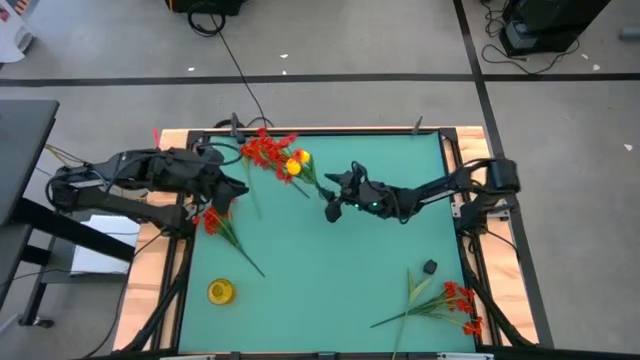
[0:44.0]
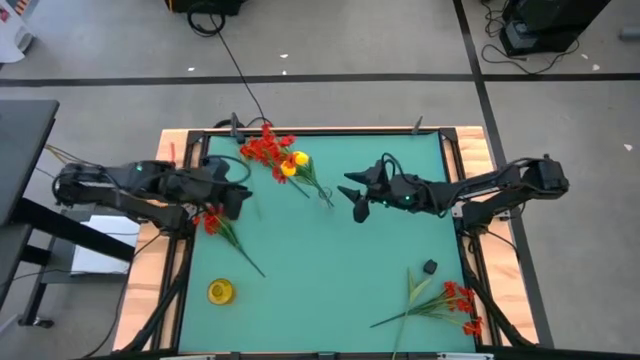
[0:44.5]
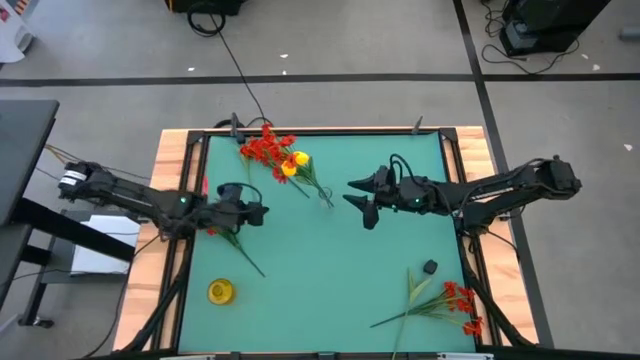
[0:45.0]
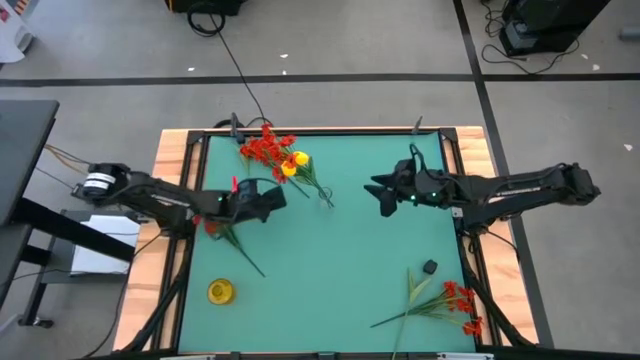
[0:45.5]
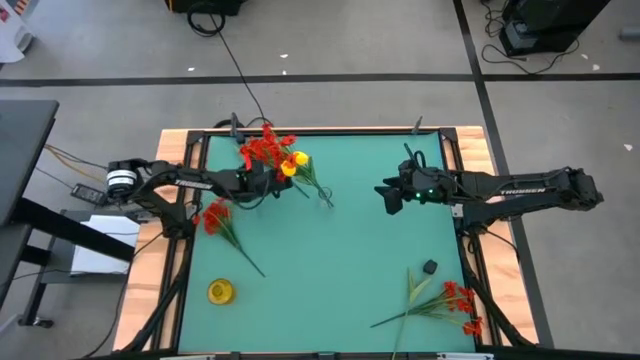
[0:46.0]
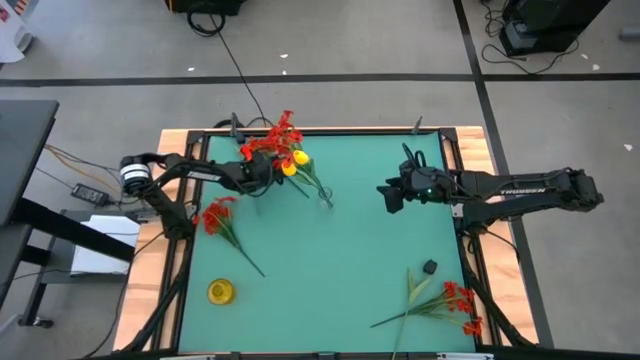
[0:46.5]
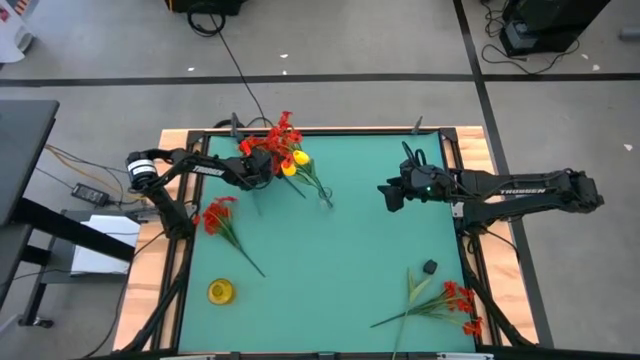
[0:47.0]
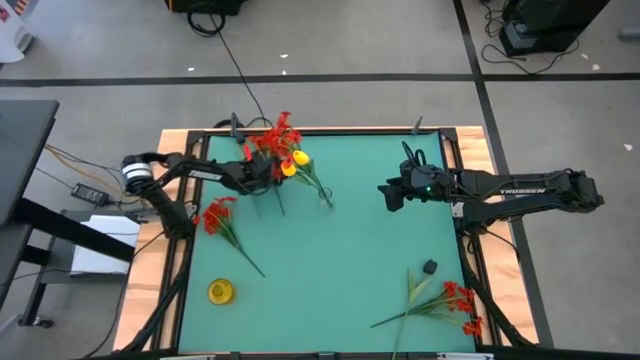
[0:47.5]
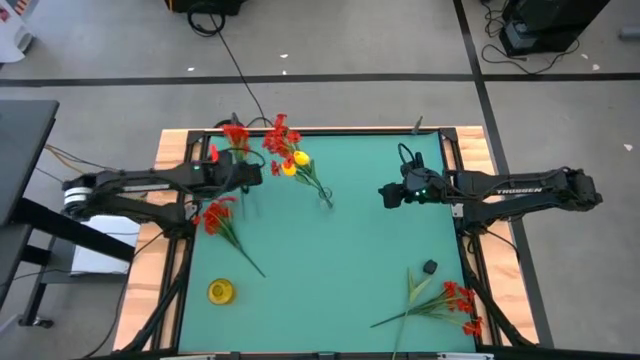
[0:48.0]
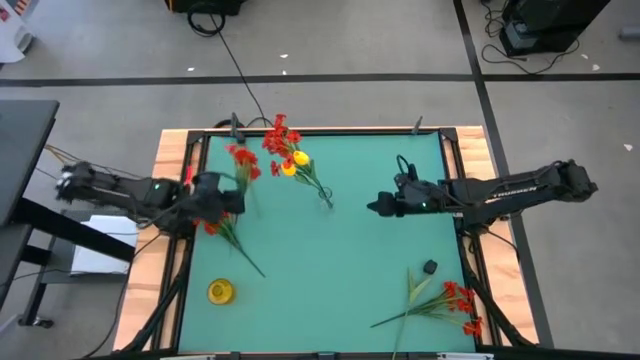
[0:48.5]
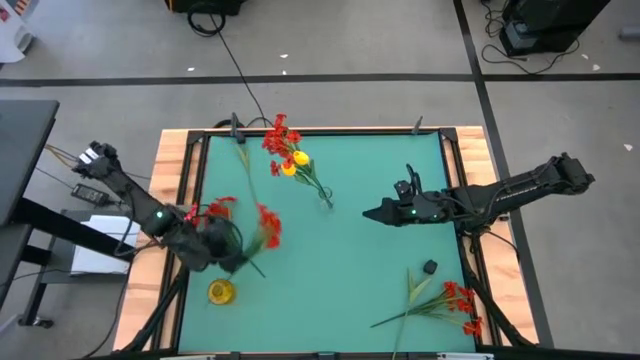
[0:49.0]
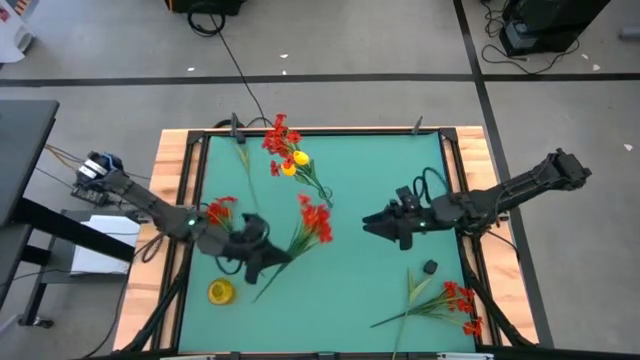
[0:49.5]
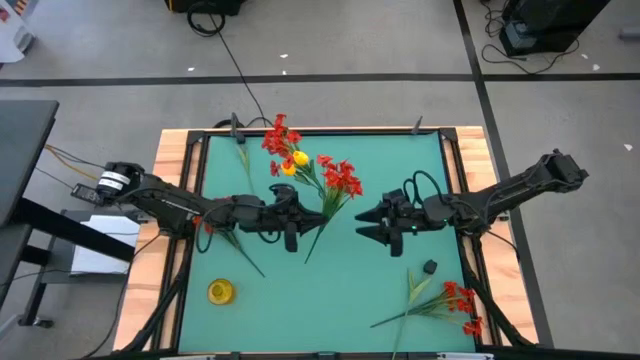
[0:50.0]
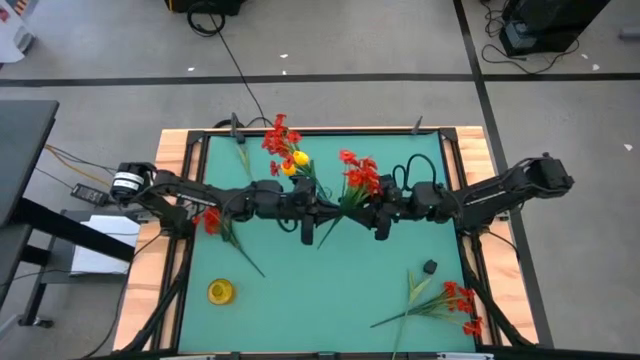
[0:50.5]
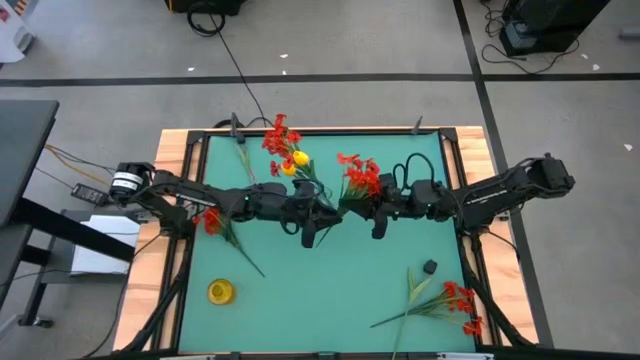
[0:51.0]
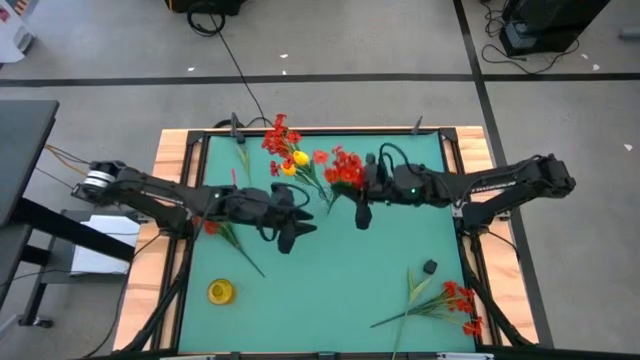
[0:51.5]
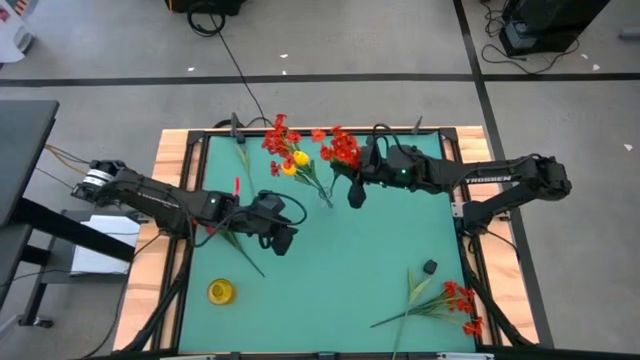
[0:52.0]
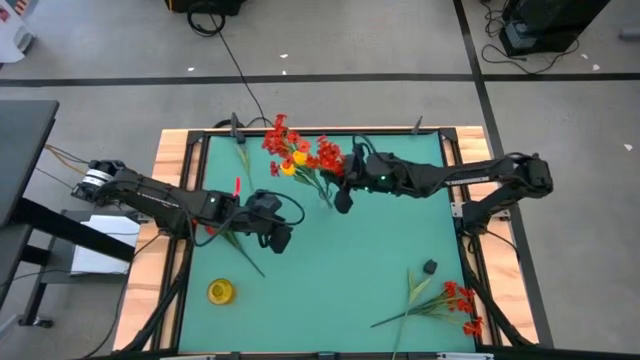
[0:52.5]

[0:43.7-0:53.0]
Task: Sort flowers into vase by color
Put the red flowers into the transparent vase

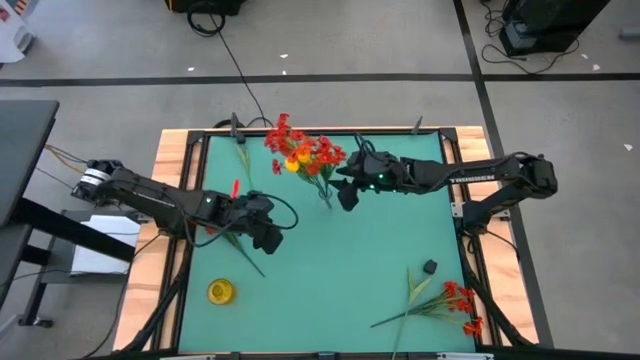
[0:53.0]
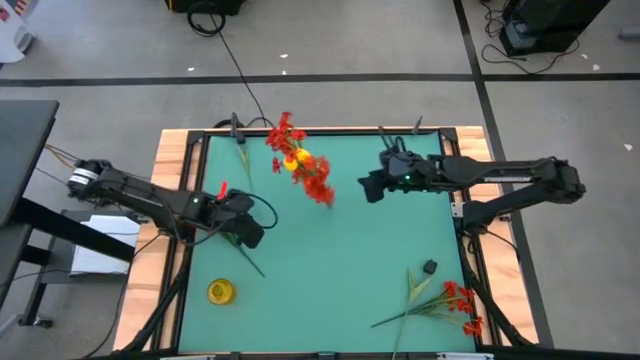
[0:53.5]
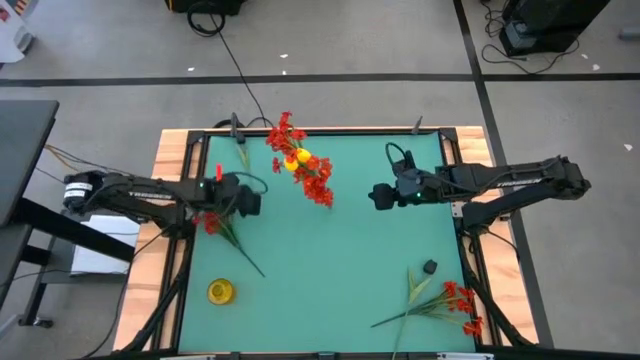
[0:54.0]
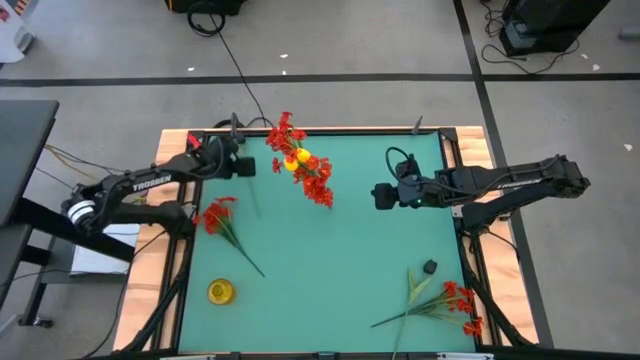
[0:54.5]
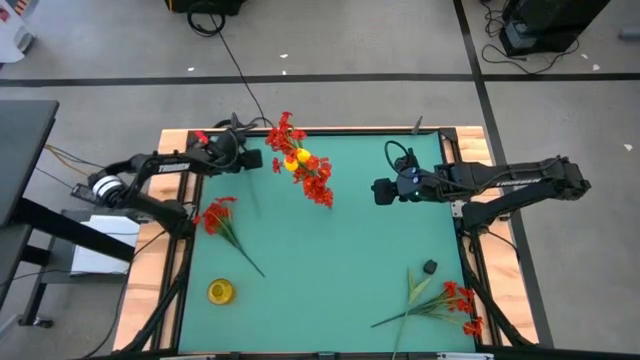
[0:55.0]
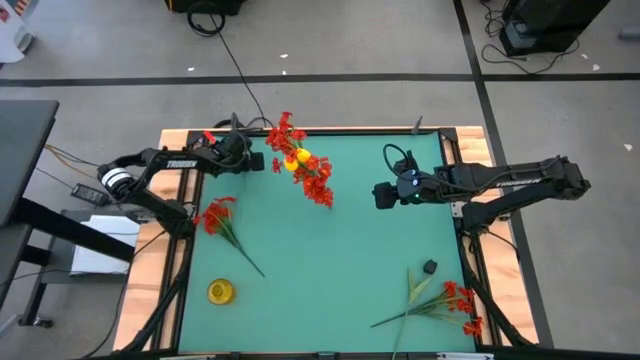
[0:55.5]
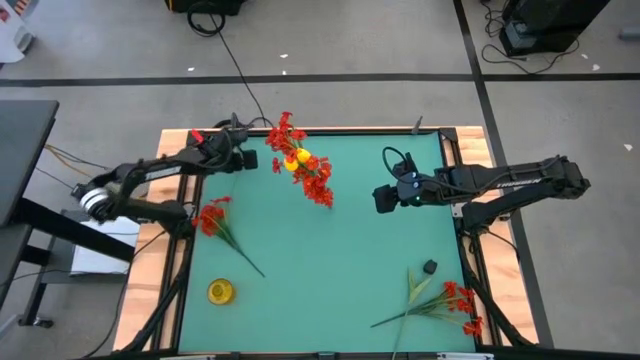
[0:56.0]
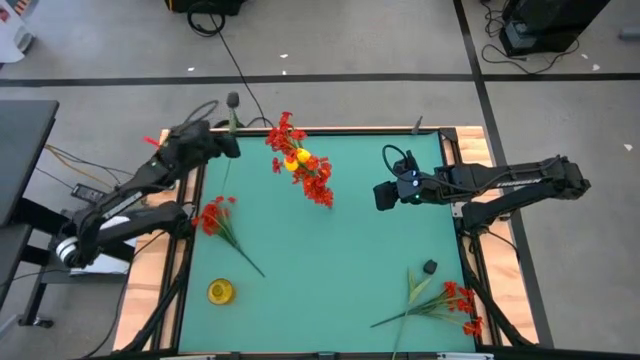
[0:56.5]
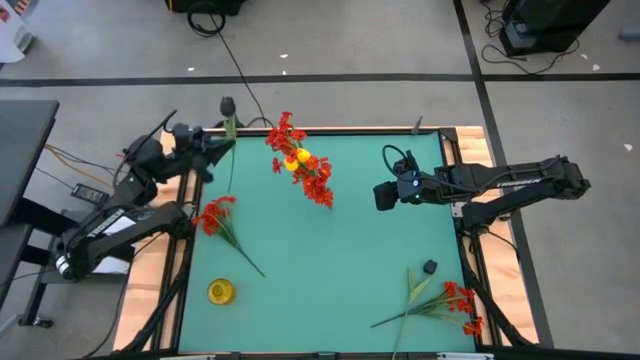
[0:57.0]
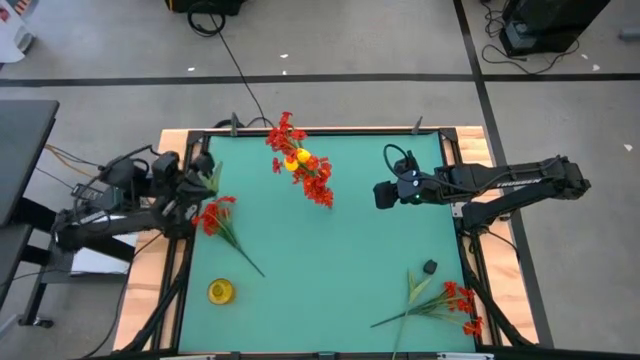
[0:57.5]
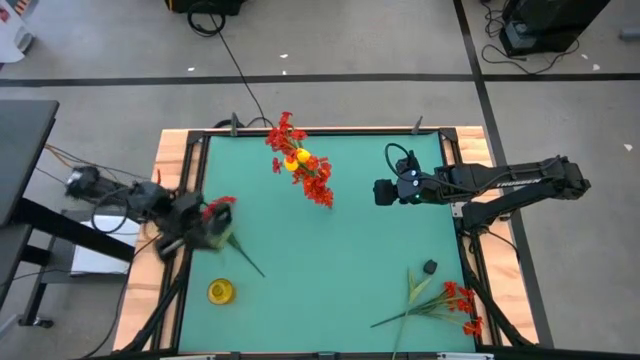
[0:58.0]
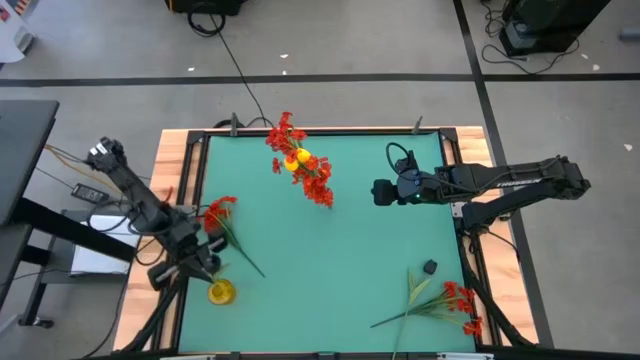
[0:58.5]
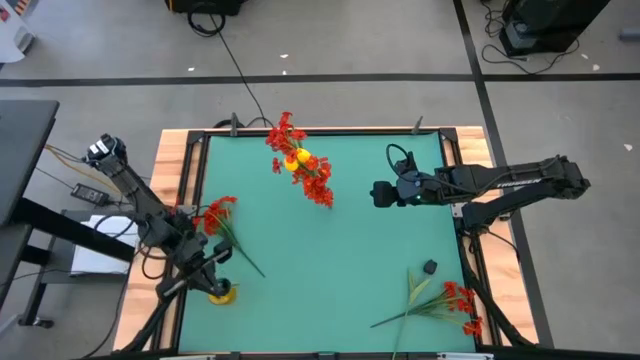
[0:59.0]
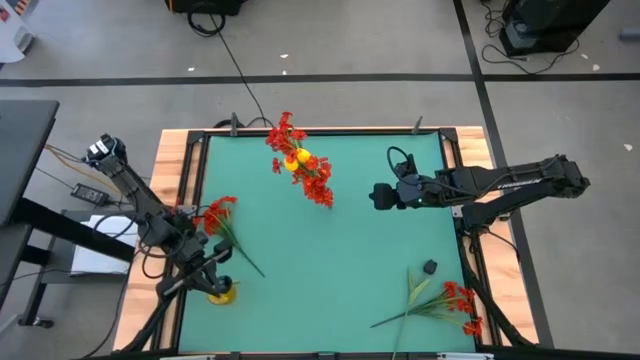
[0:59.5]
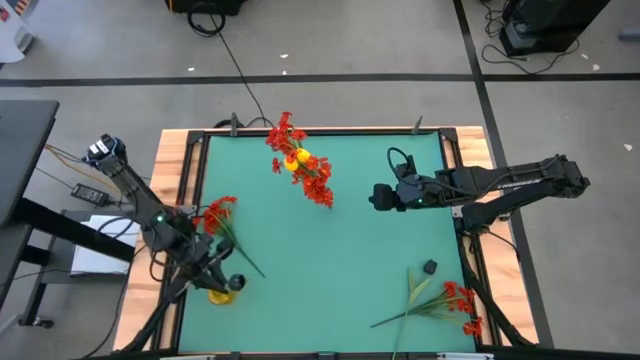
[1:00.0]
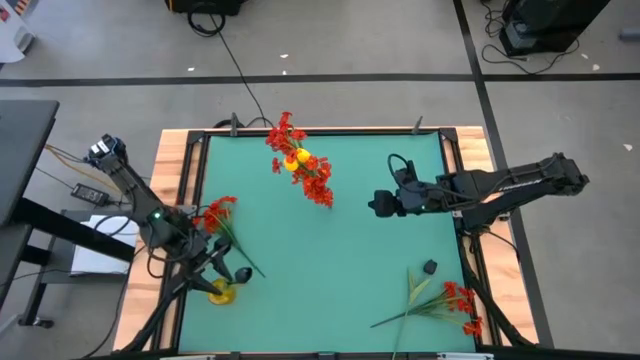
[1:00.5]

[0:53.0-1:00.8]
Put the black tulip into the yellow vase

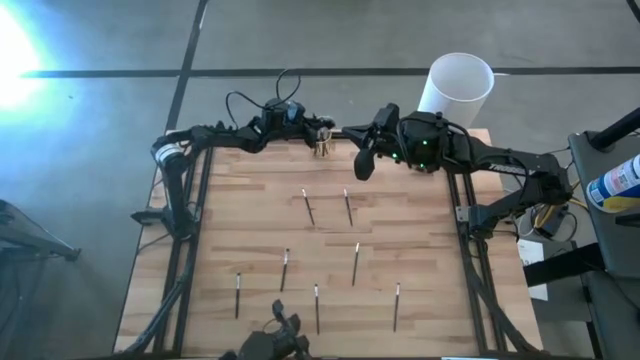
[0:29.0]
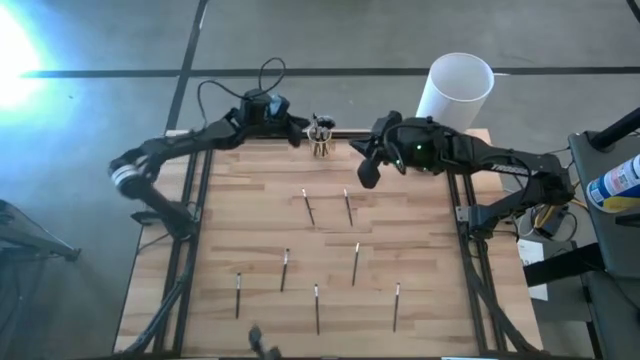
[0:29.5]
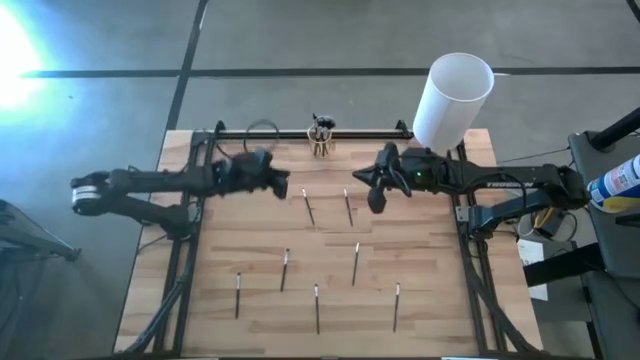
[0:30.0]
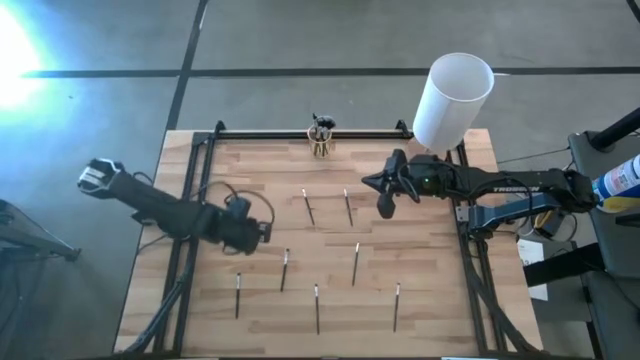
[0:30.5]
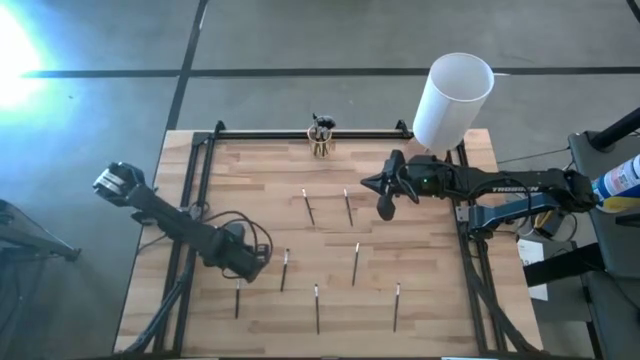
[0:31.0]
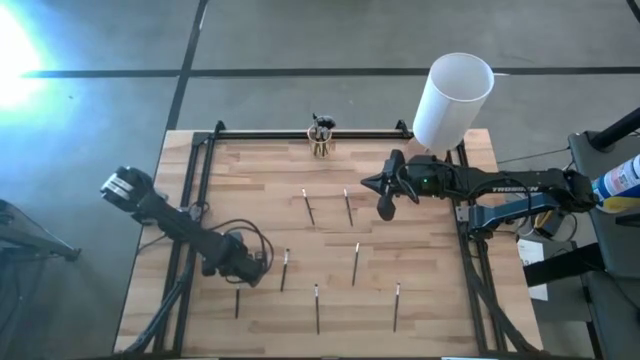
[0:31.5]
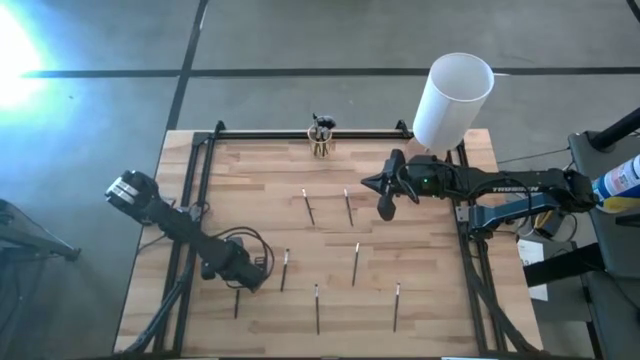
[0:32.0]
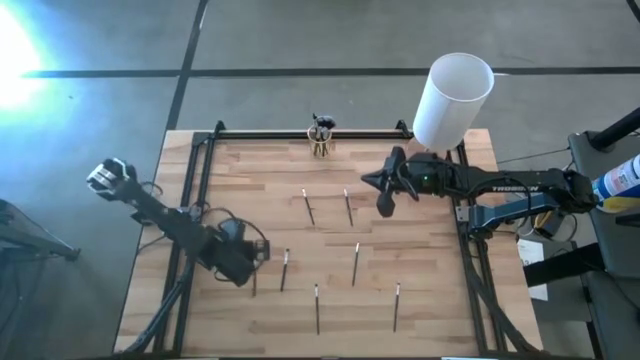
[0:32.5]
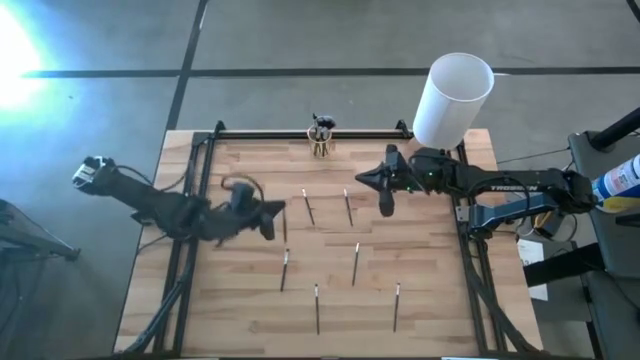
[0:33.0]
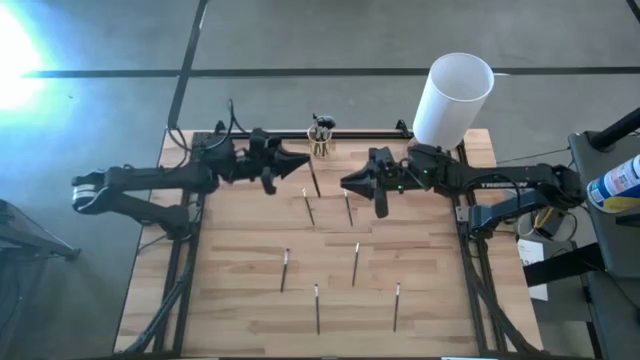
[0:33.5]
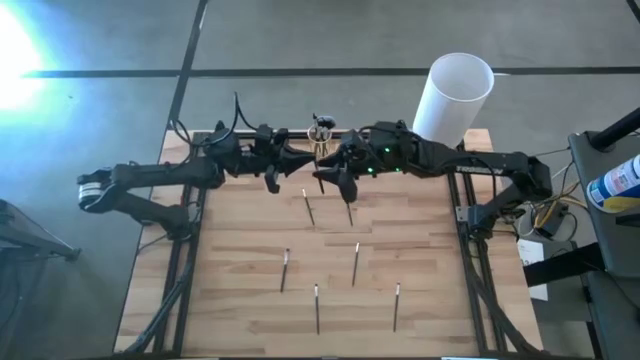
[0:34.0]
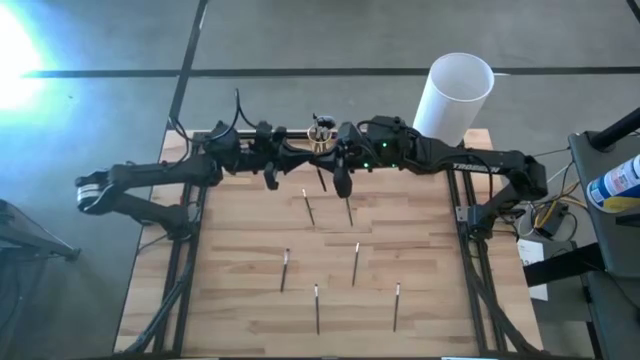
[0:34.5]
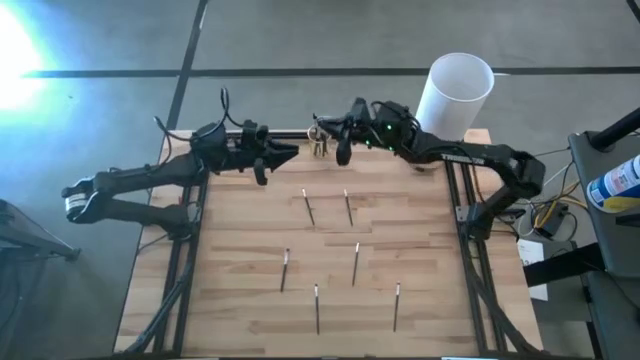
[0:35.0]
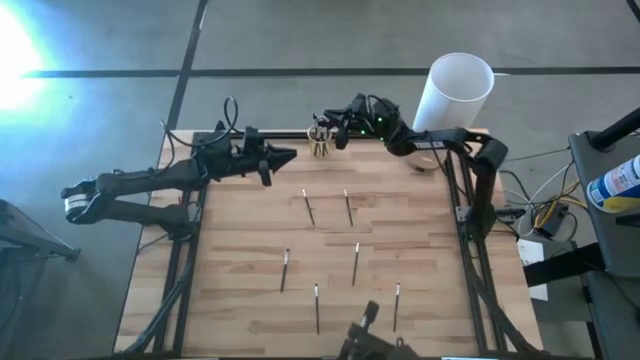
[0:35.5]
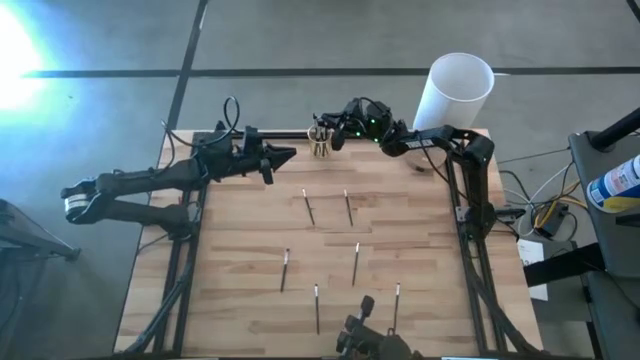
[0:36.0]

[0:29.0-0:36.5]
Task: Put items in baskets/containers
Put the black eyeshadow brush into the yellow pen holder
